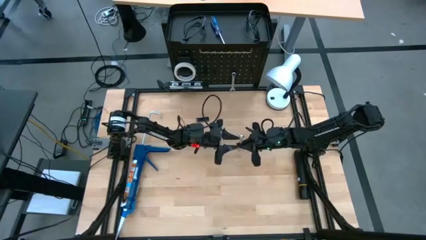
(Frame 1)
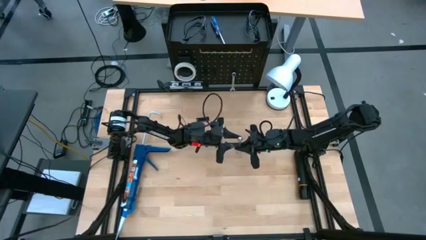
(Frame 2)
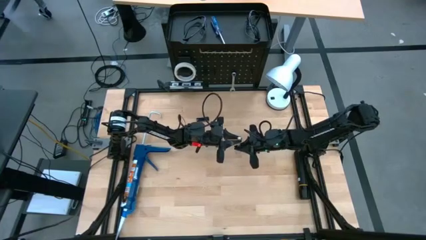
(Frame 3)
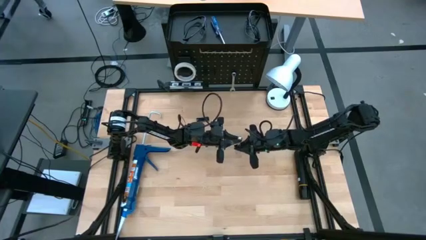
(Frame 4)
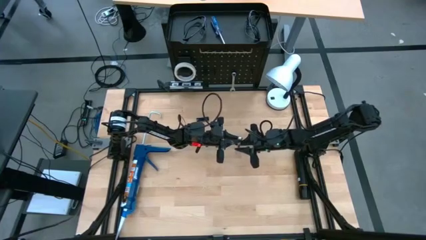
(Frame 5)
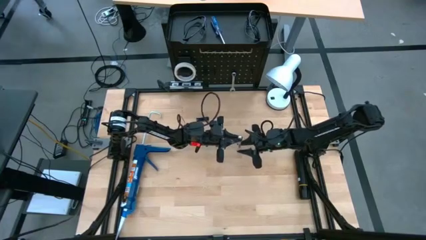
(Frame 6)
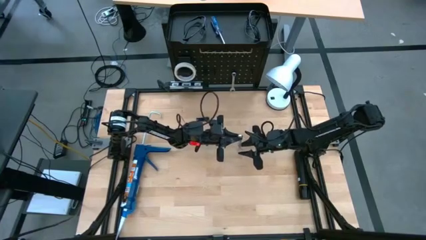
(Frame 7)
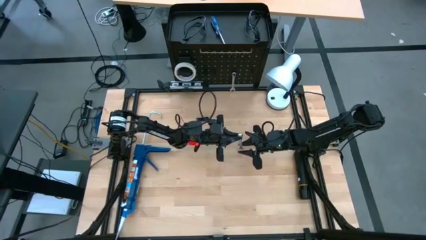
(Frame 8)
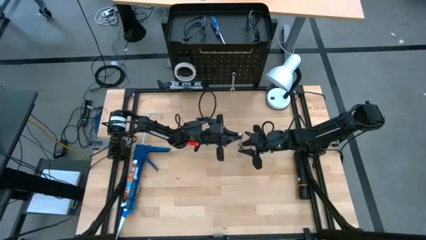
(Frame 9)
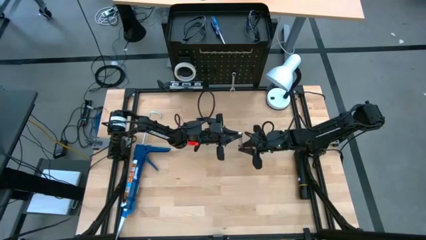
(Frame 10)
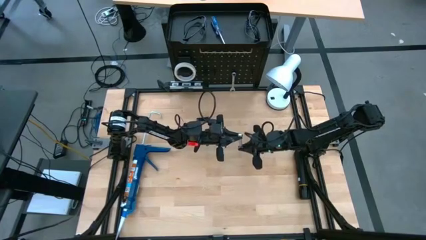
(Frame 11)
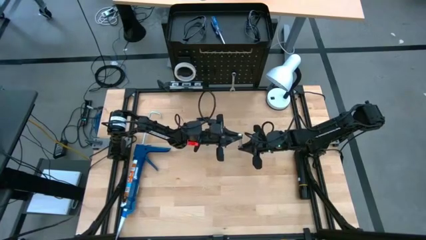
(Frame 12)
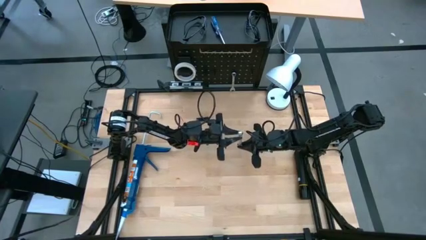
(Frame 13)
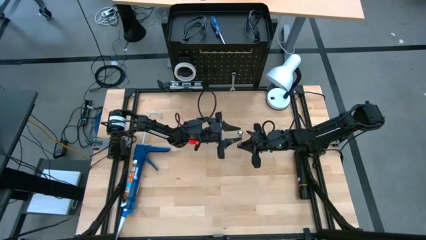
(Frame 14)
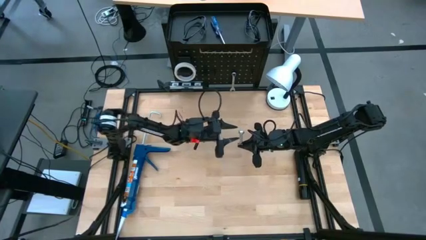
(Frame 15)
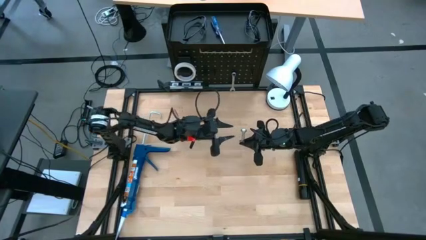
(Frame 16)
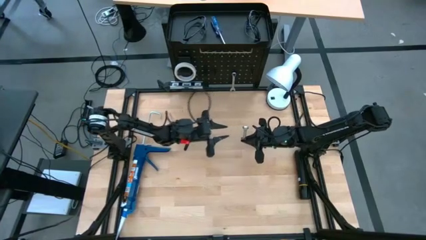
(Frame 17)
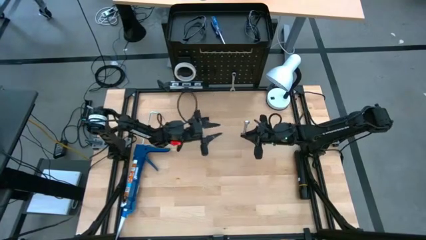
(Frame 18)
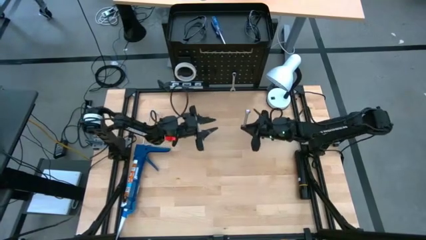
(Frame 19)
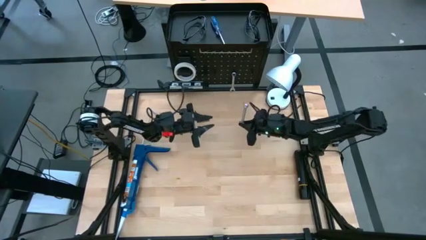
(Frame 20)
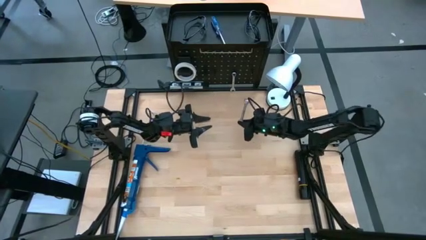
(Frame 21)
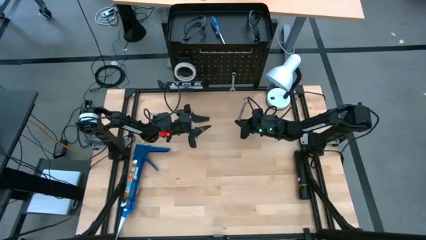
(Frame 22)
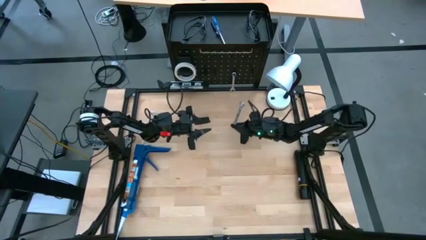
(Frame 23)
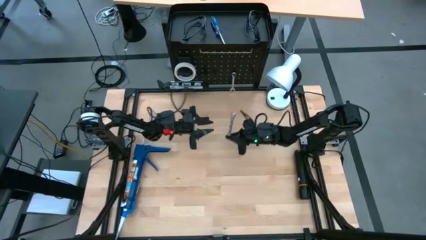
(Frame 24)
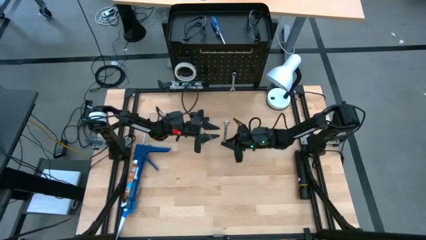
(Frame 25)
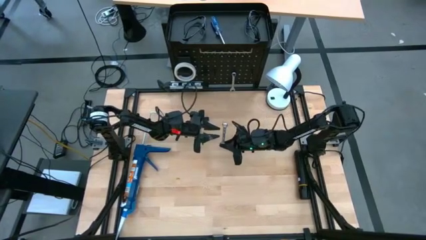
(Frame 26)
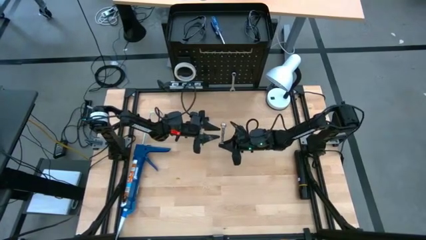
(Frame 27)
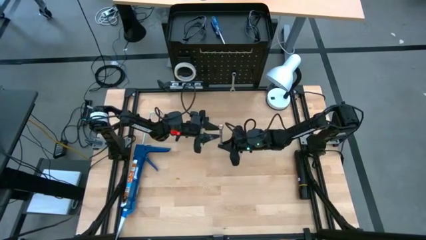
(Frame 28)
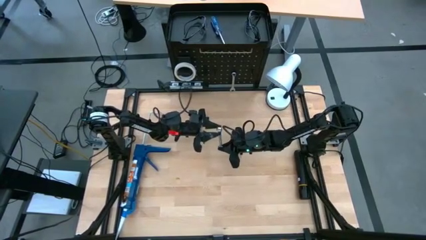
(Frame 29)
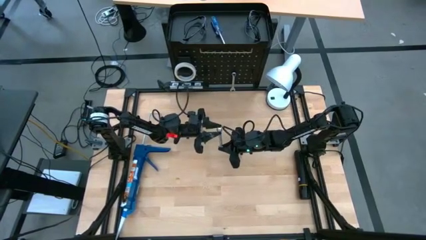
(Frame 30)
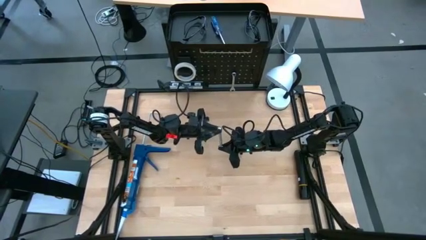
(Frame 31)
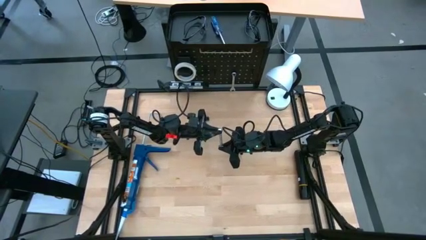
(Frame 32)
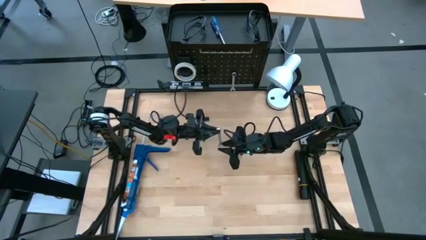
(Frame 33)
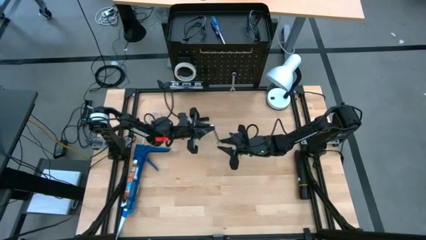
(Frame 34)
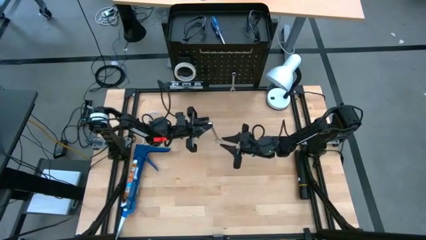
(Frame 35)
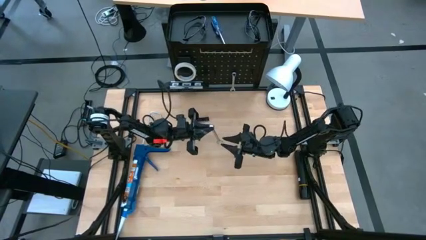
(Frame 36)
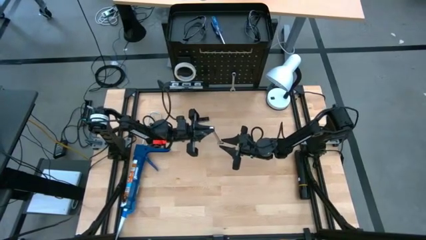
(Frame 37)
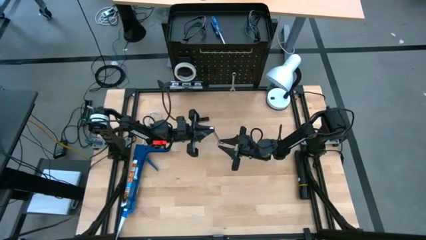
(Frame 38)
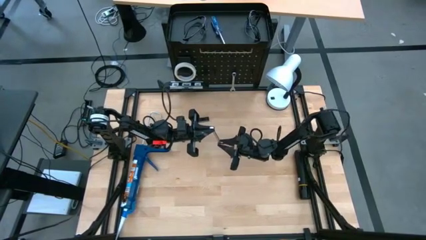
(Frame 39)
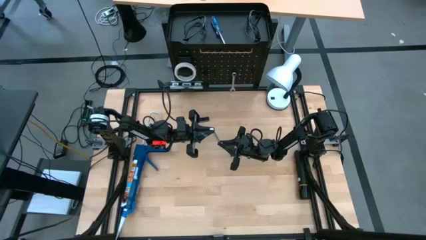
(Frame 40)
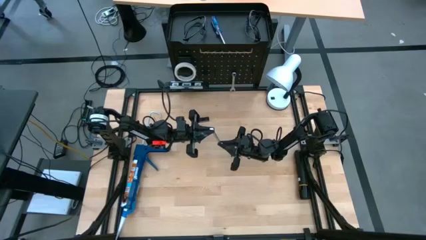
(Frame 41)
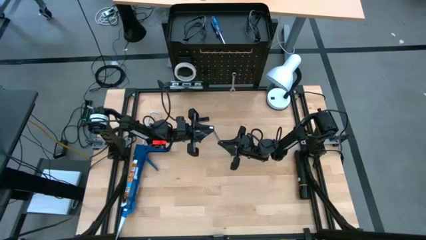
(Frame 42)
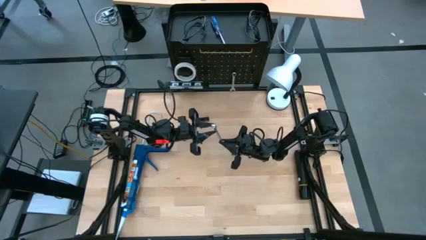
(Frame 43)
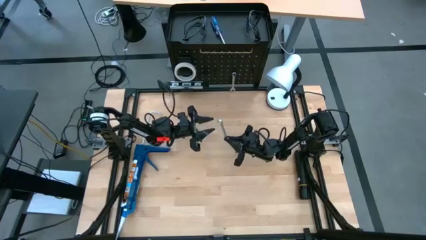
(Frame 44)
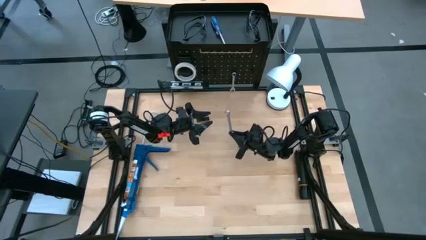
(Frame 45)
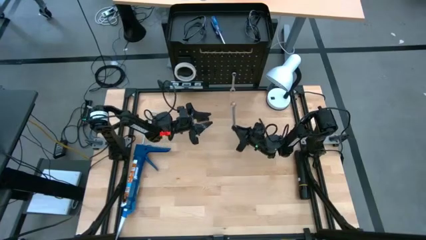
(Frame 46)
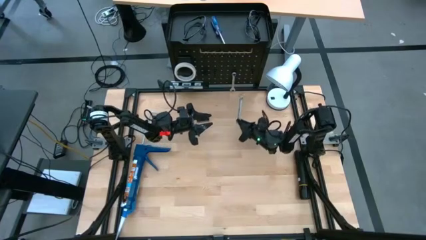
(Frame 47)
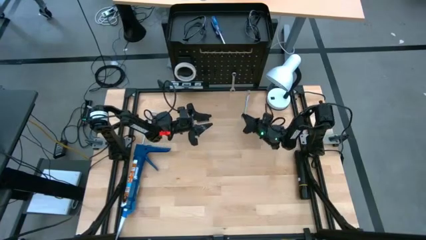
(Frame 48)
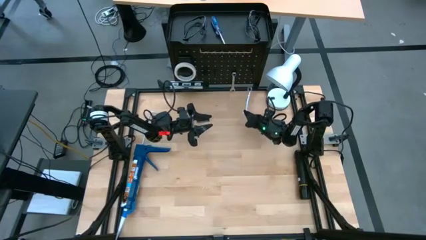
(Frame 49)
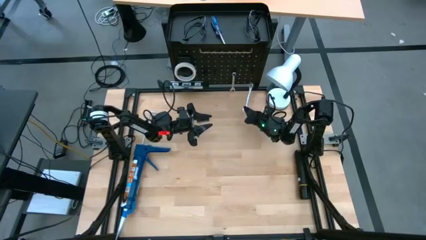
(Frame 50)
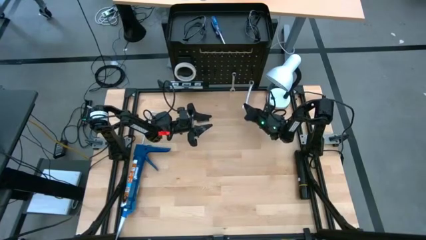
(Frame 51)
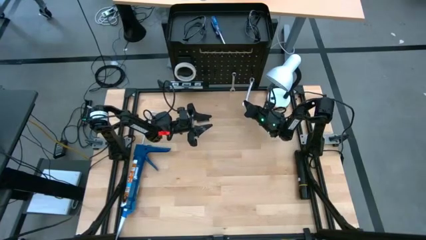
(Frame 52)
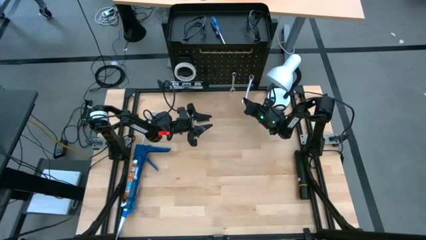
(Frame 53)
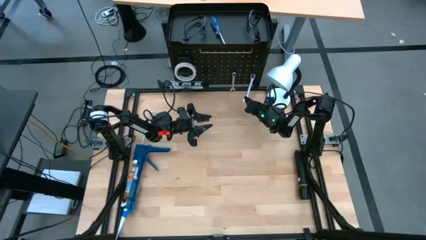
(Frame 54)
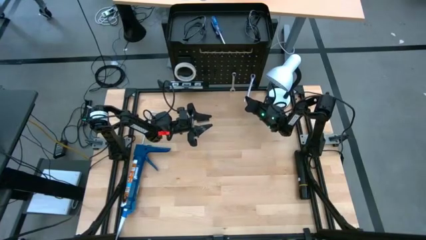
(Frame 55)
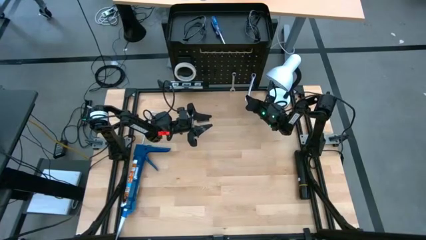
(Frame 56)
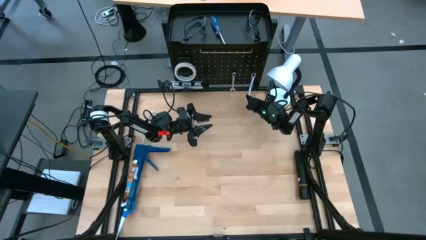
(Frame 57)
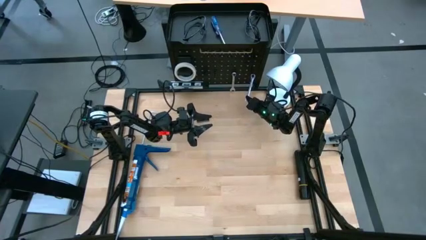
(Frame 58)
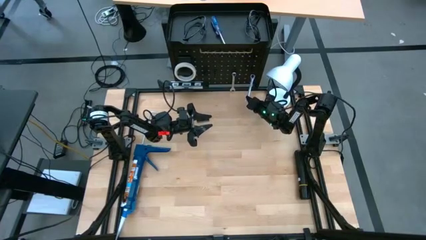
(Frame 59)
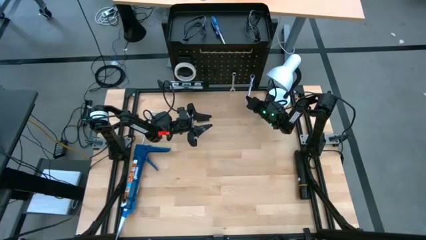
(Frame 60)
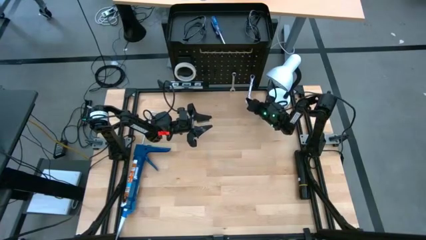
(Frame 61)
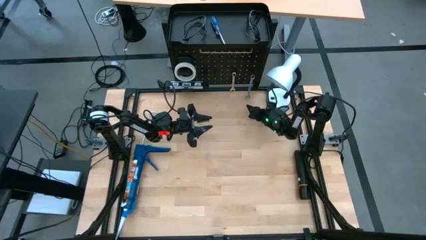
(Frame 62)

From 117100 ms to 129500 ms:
Task: Hang tools onto peg board
Hang the wrench on the pegboard
